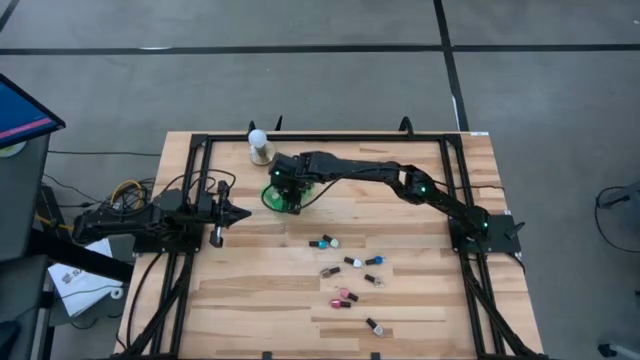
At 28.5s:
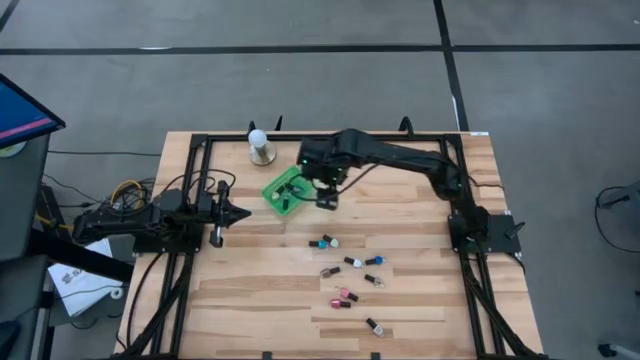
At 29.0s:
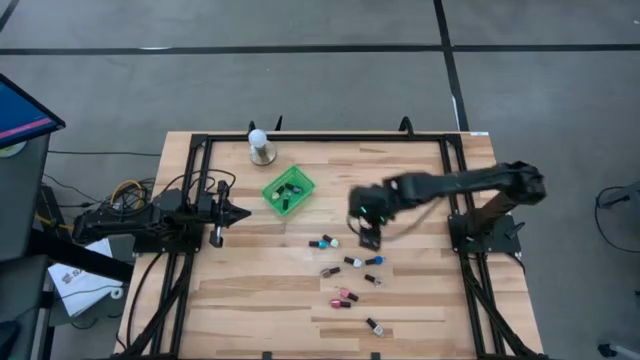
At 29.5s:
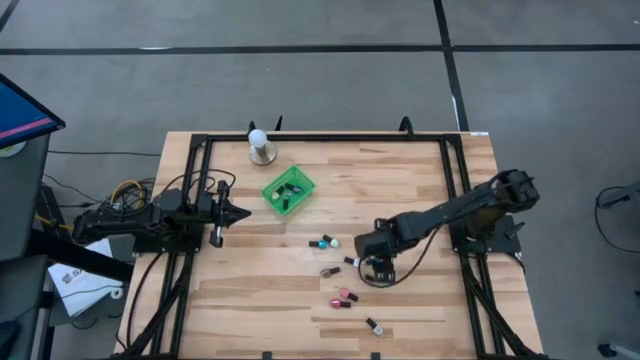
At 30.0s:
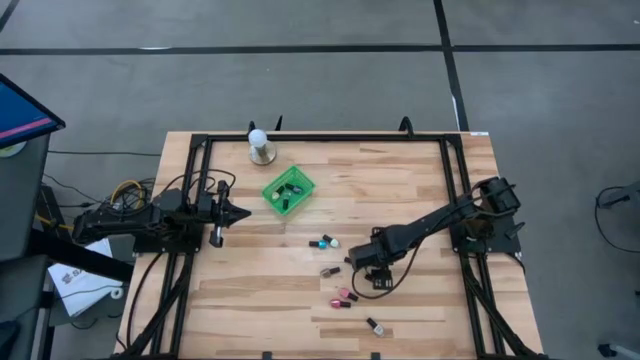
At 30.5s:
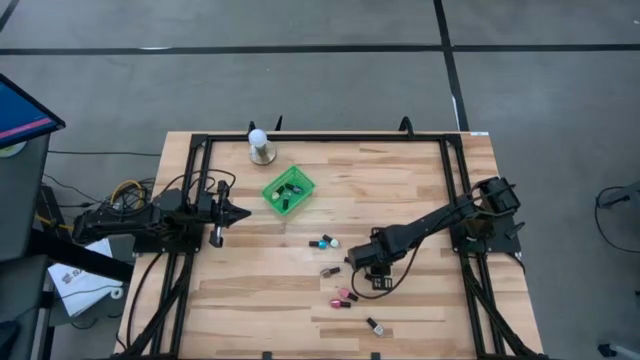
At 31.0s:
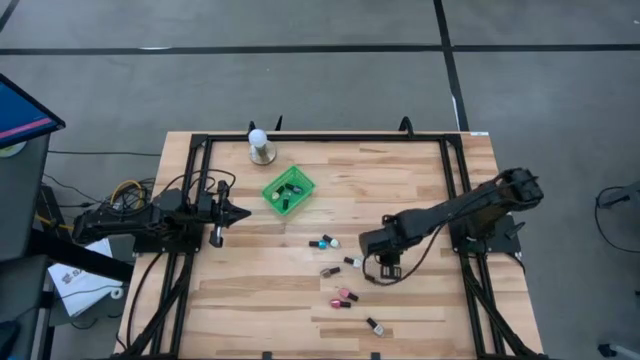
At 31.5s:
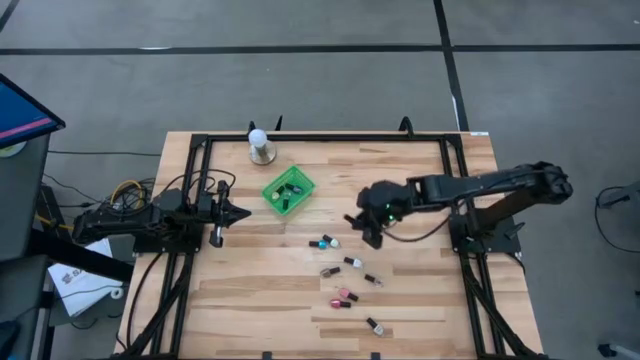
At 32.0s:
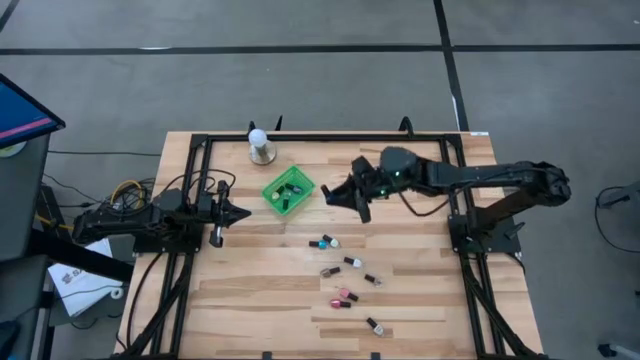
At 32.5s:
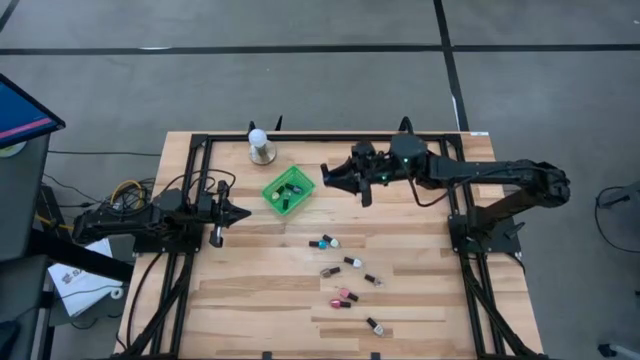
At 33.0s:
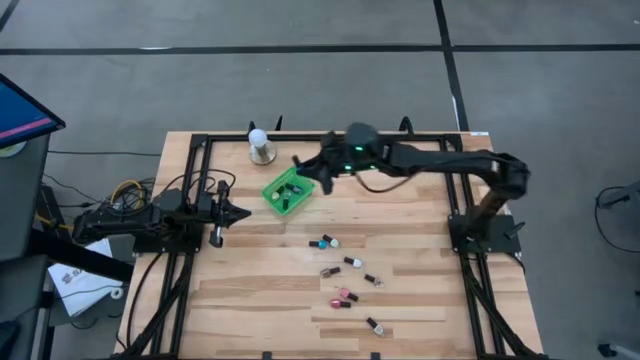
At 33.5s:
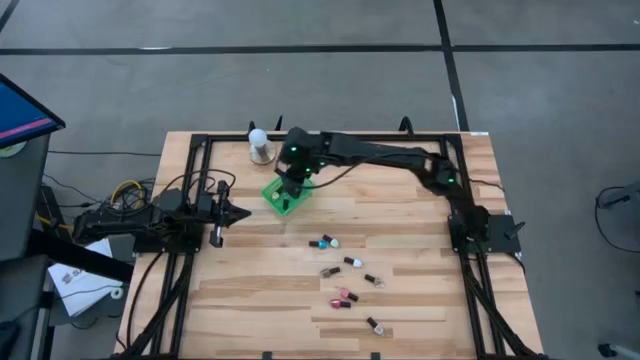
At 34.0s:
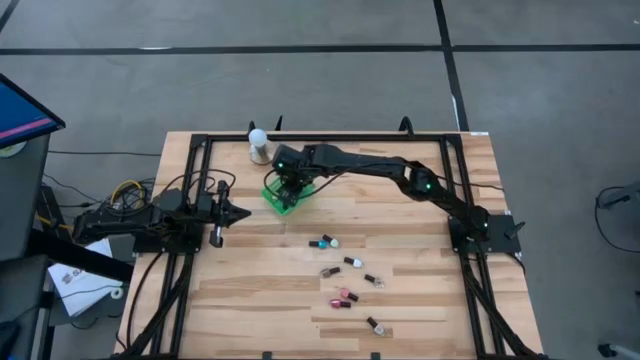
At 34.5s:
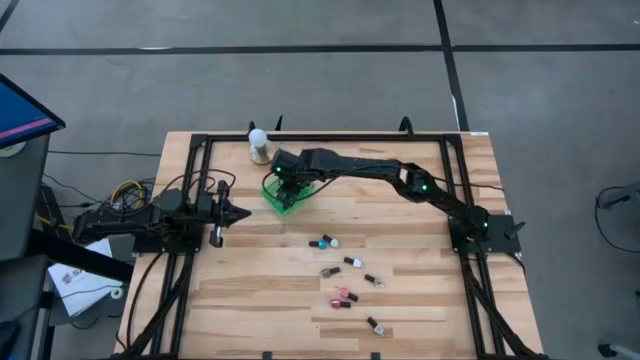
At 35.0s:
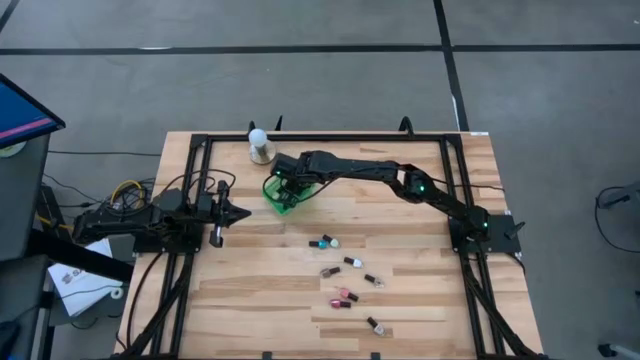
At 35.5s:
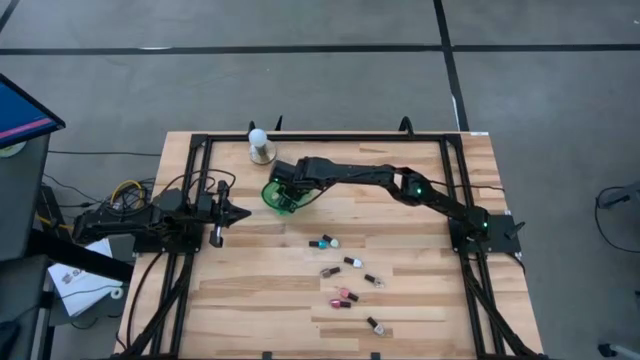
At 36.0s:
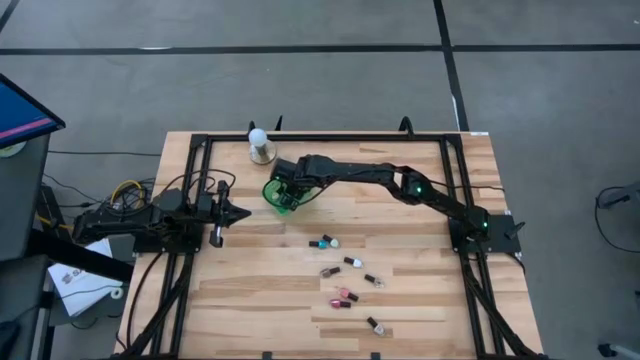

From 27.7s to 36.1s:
Task: Pick & Place Nail Polish
Put the dark blue nail polish bottle into the green bin

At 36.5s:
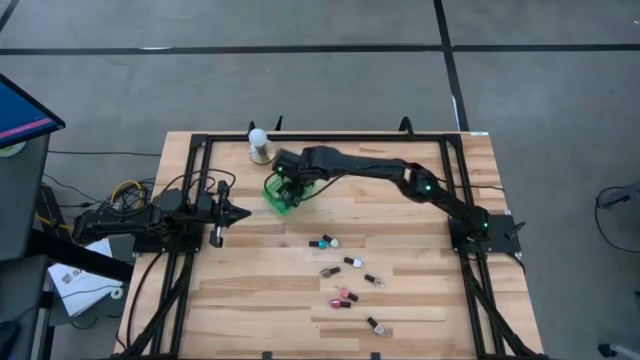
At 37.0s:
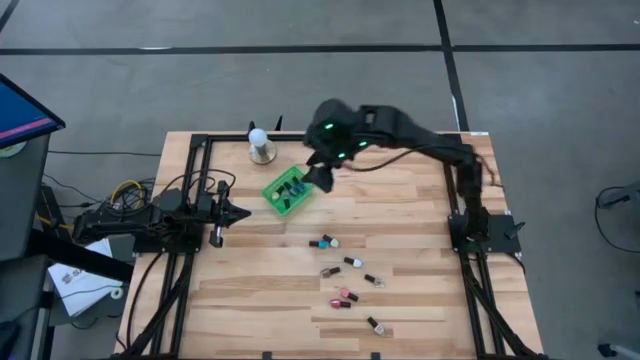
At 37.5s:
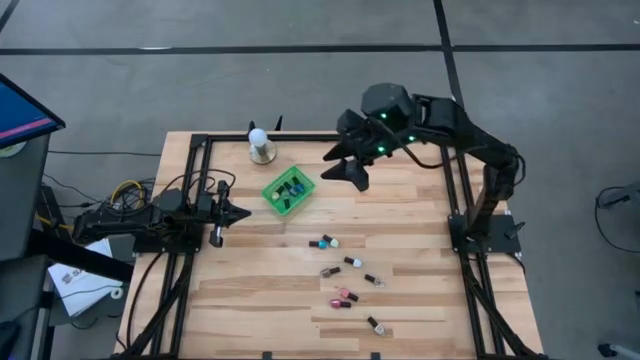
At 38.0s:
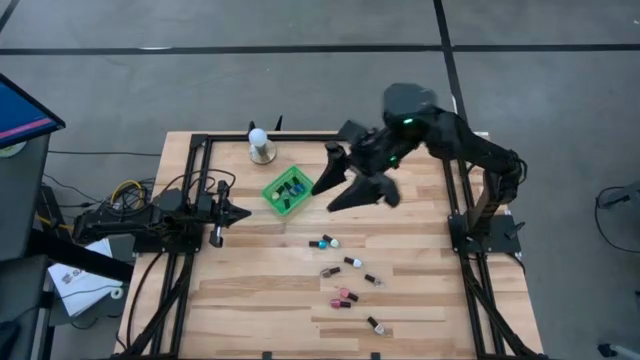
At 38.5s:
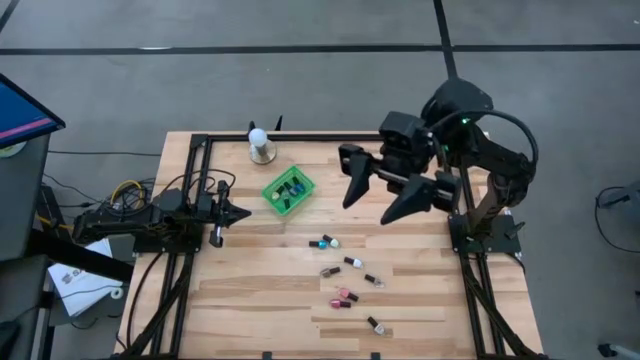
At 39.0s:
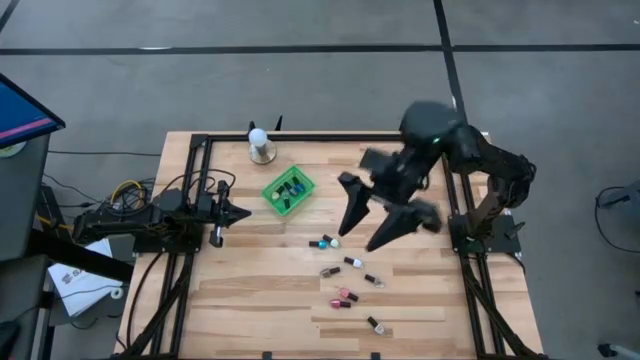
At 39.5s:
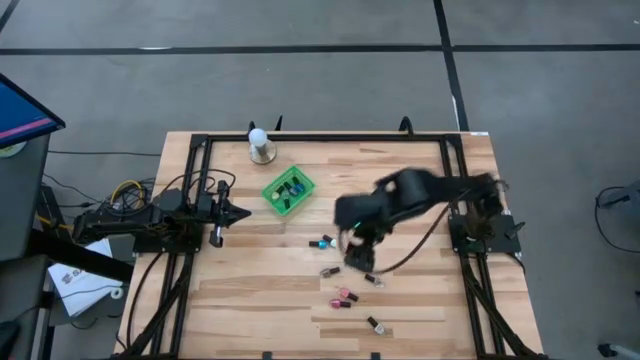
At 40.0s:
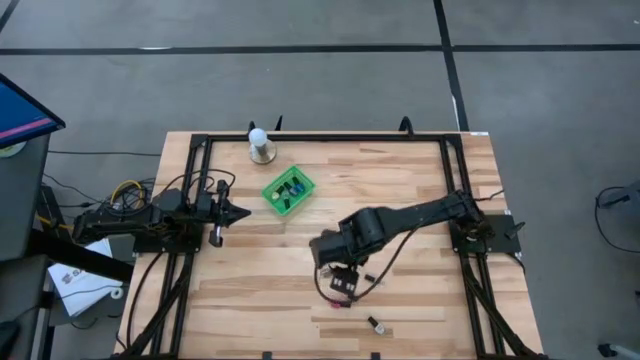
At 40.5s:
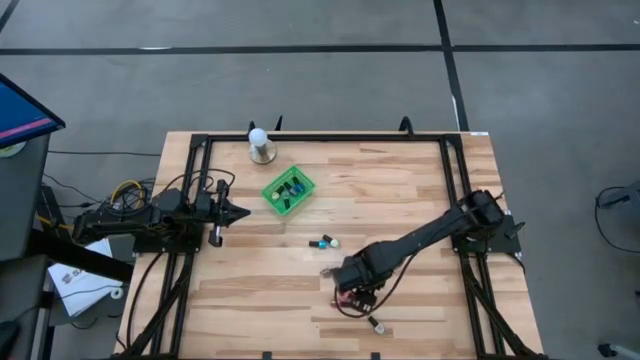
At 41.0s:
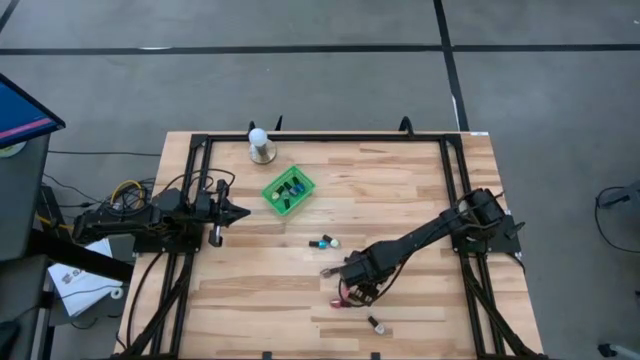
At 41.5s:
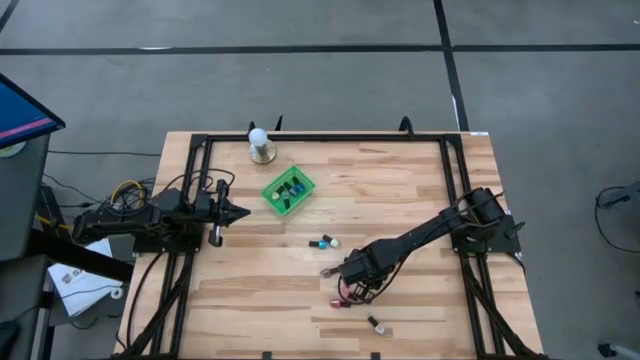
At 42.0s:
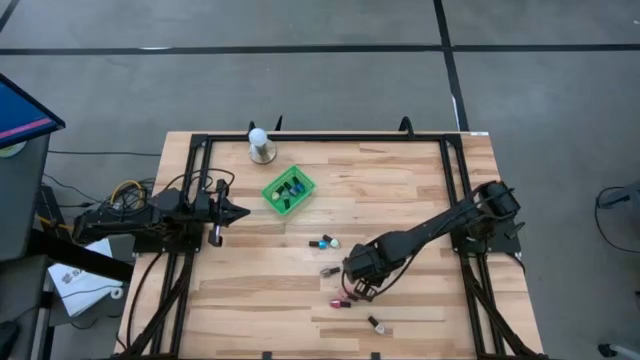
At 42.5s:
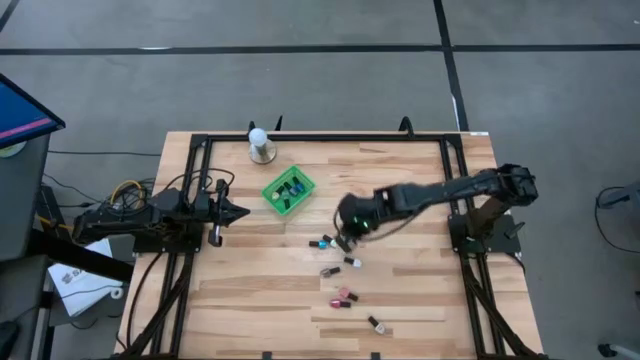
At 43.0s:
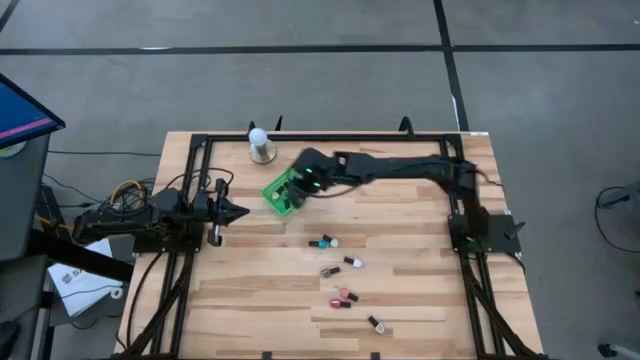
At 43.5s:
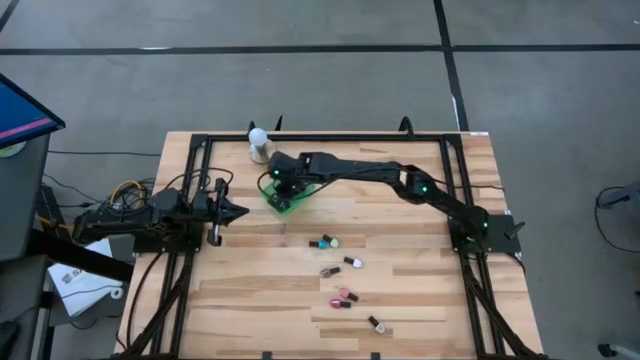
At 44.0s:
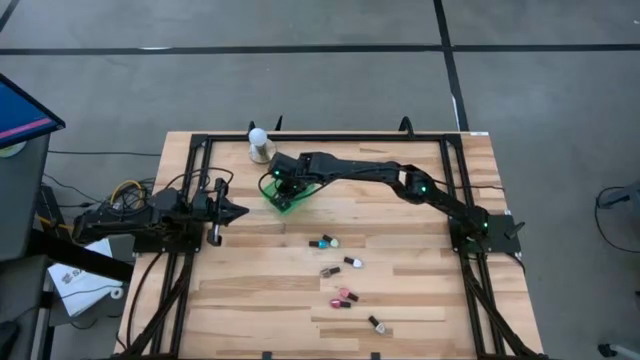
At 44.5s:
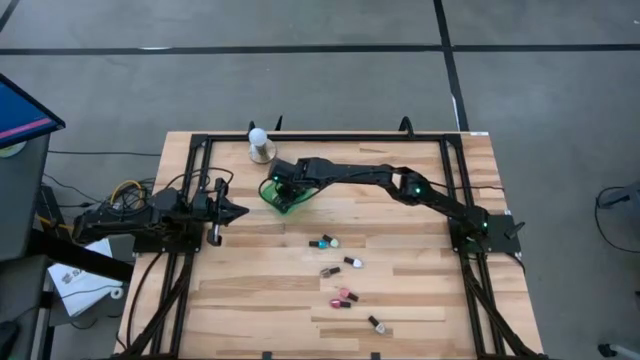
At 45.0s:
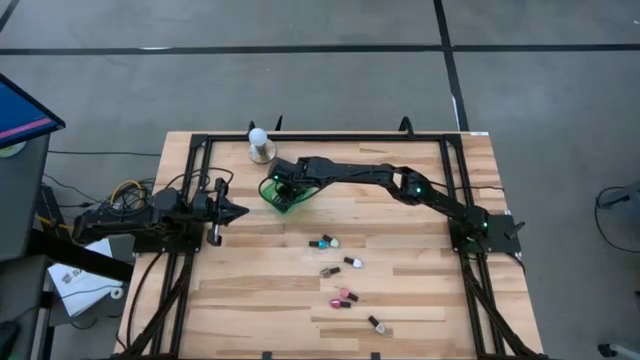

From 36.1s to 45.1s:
Put the transparent nail polish bottle into the green bin

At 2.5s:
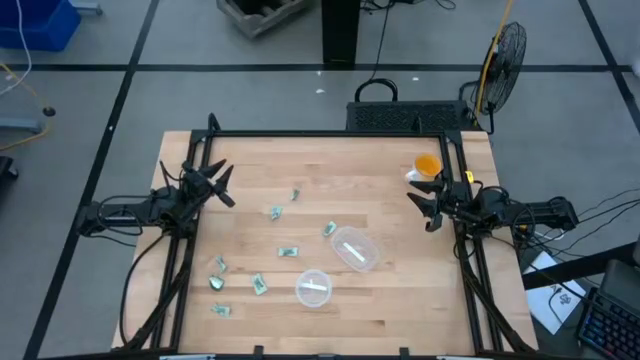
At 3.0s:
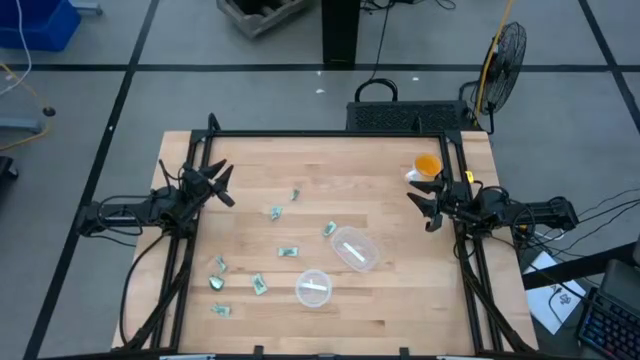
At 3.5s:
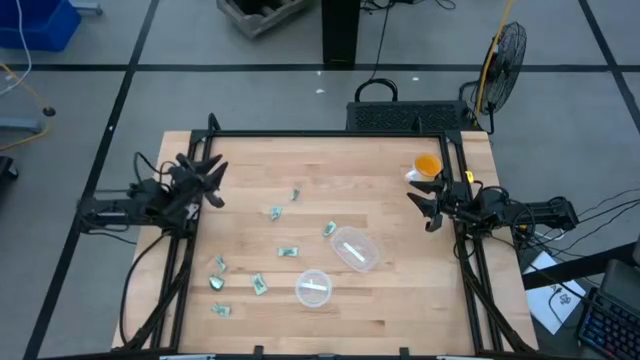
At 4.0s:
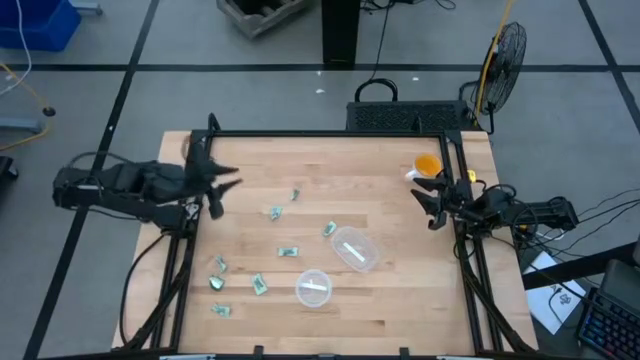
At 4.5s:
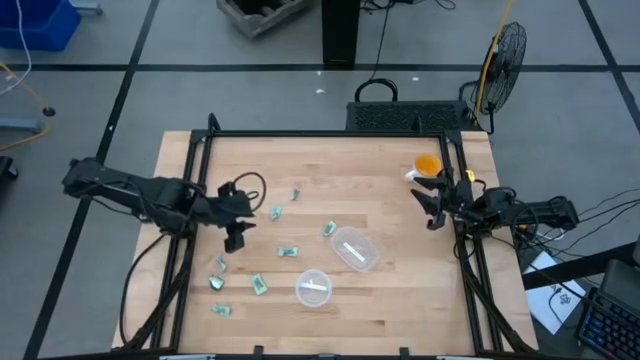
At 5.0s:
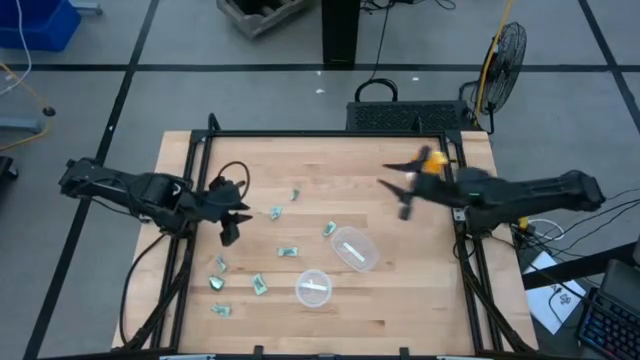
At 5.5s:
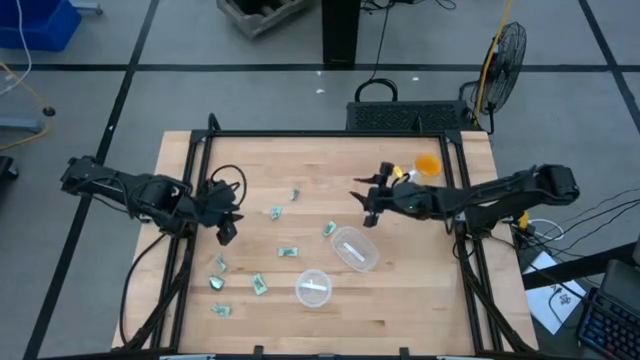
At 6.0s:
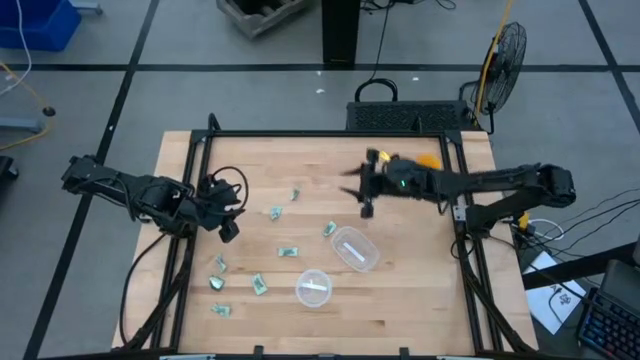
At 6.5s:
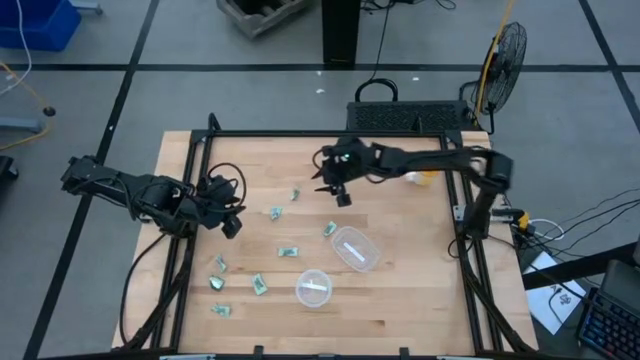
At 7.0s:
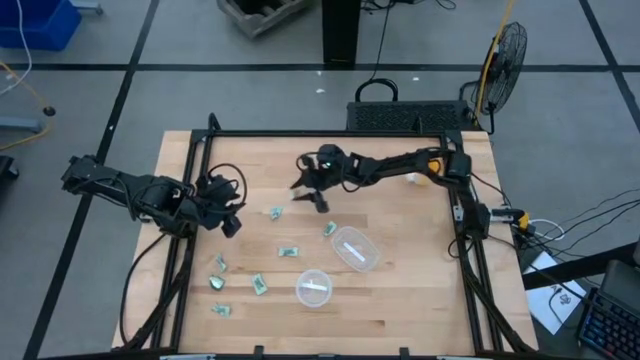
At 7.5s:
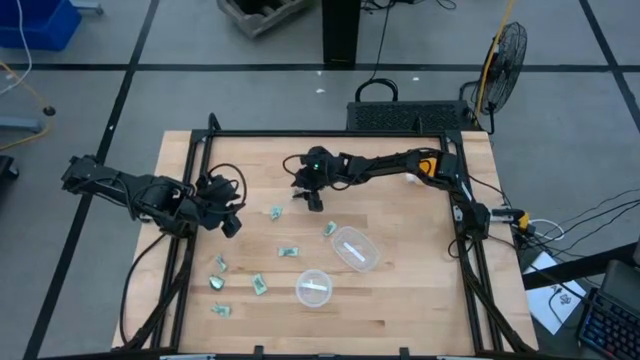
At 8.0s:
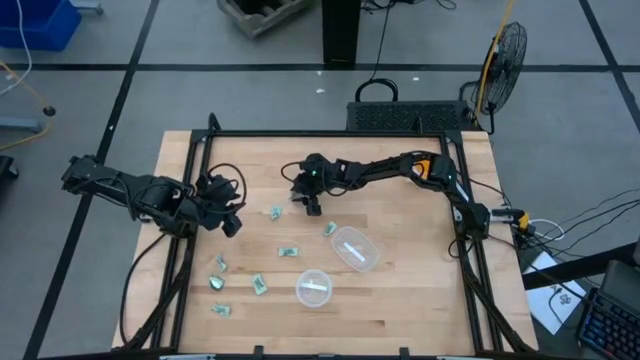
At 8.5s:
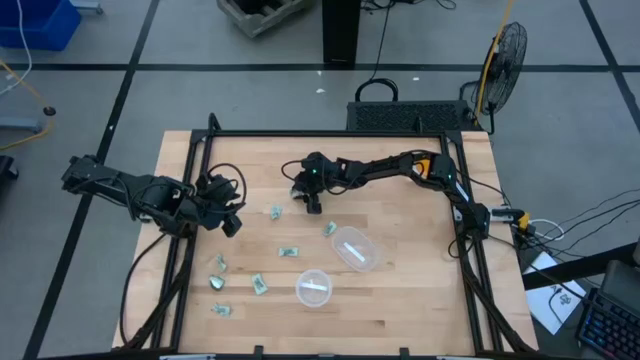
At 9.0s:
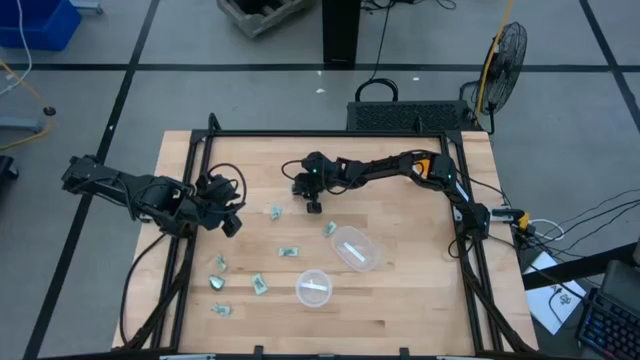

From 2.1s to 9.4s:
Task: Pick and place items into bin
Put the Stevia packet into the right transparent bin
